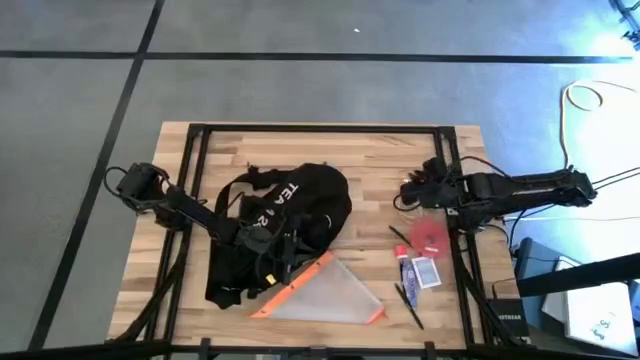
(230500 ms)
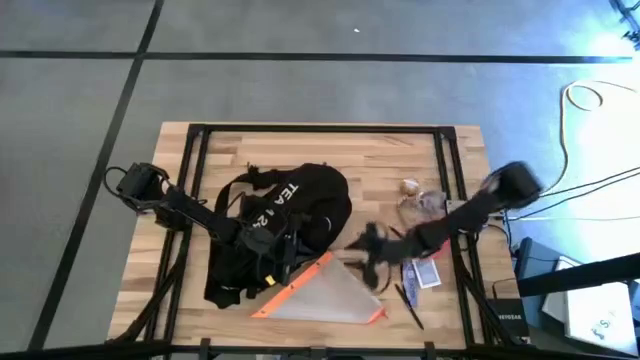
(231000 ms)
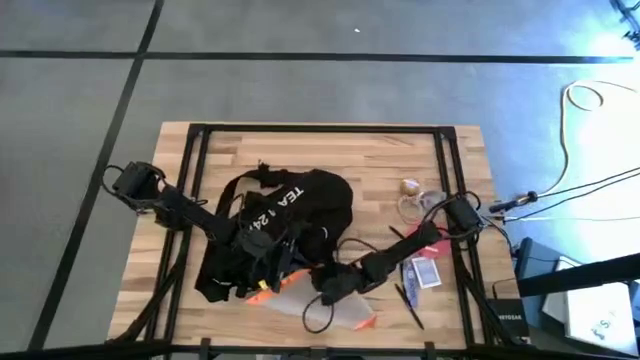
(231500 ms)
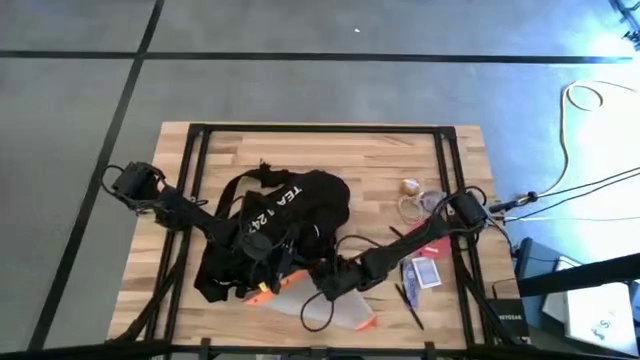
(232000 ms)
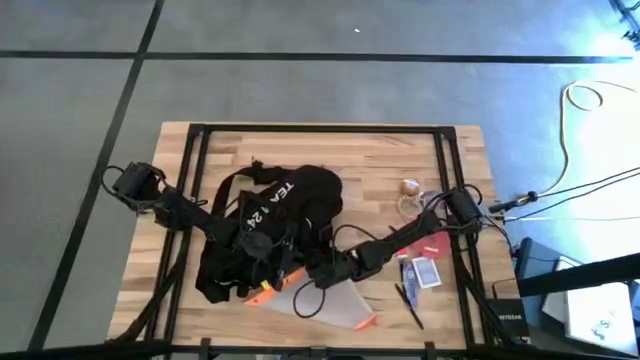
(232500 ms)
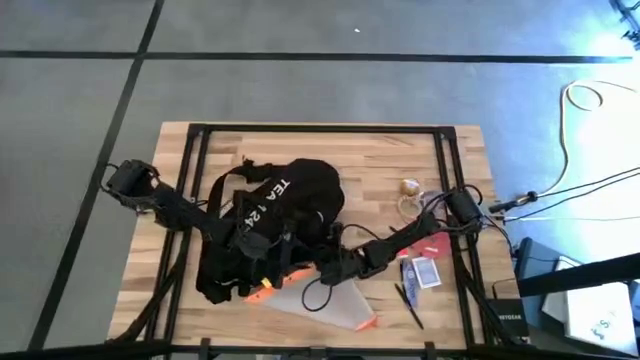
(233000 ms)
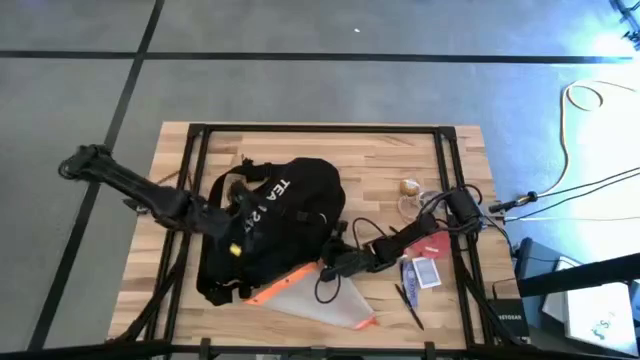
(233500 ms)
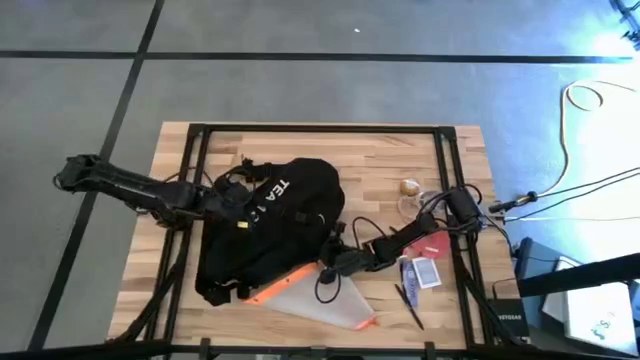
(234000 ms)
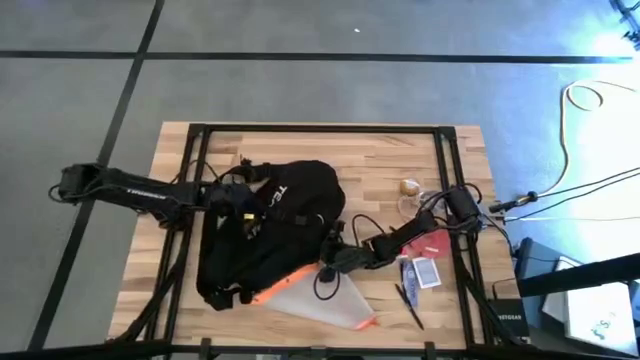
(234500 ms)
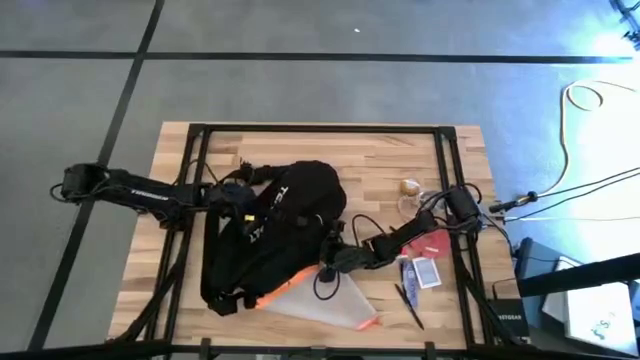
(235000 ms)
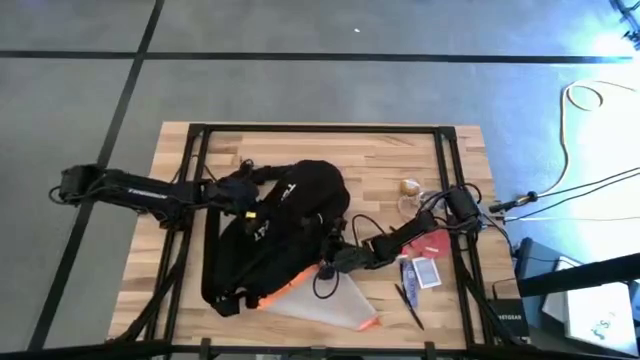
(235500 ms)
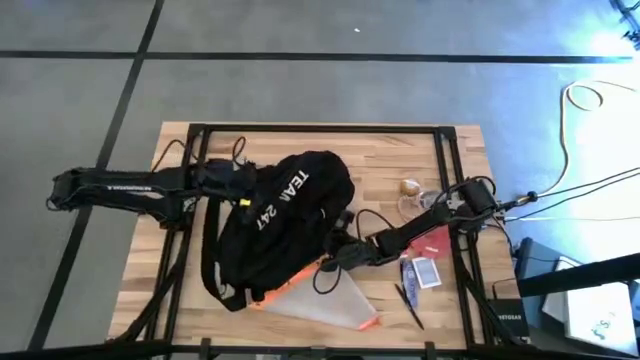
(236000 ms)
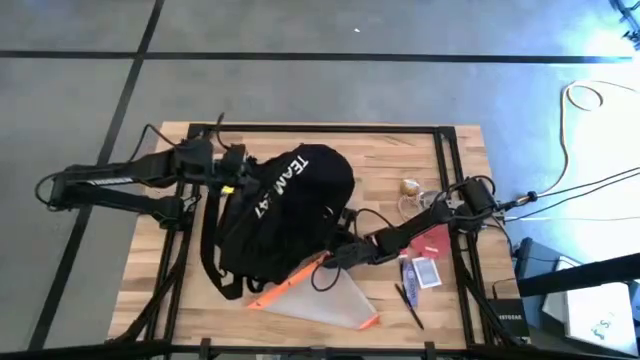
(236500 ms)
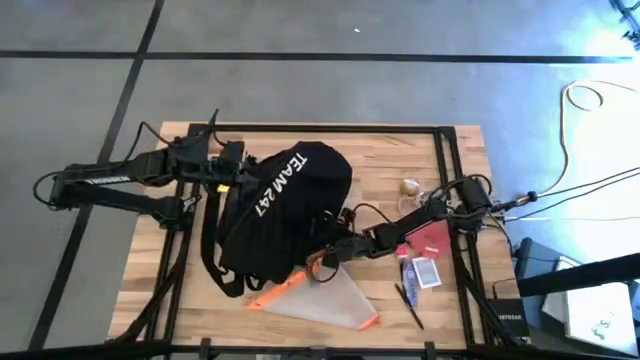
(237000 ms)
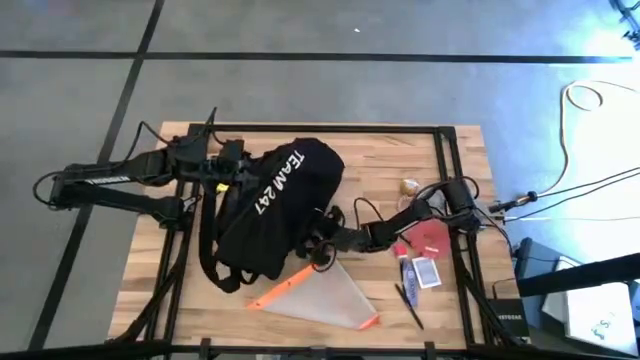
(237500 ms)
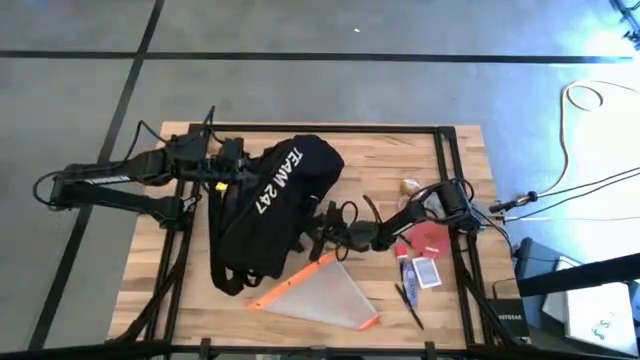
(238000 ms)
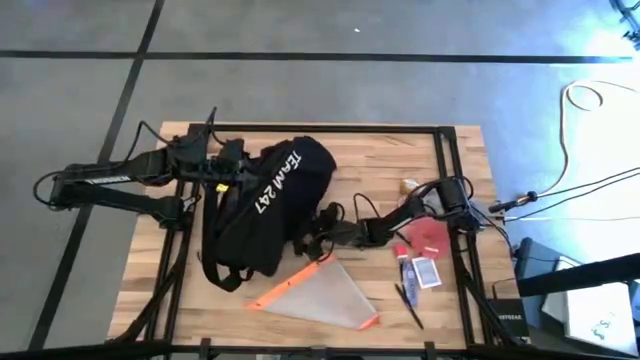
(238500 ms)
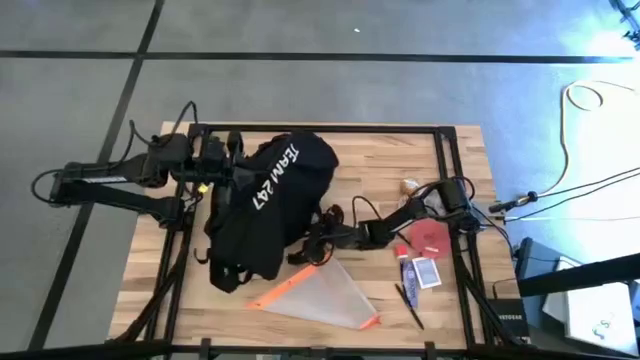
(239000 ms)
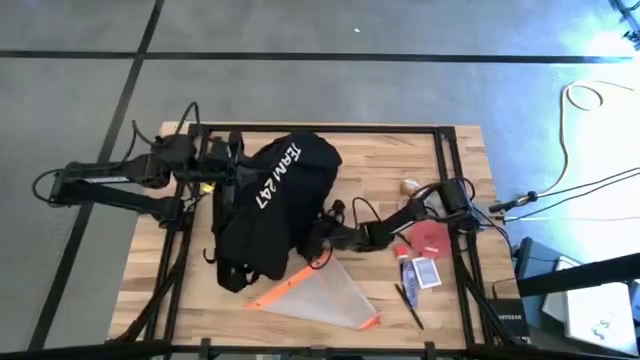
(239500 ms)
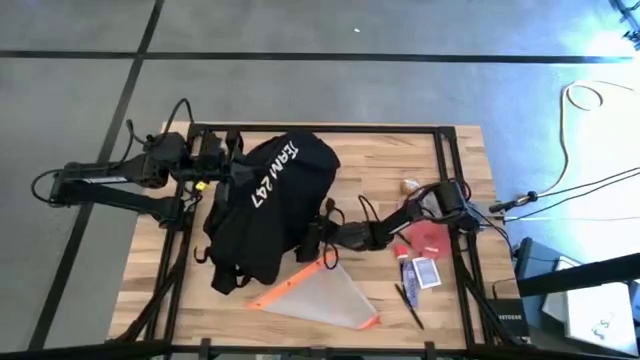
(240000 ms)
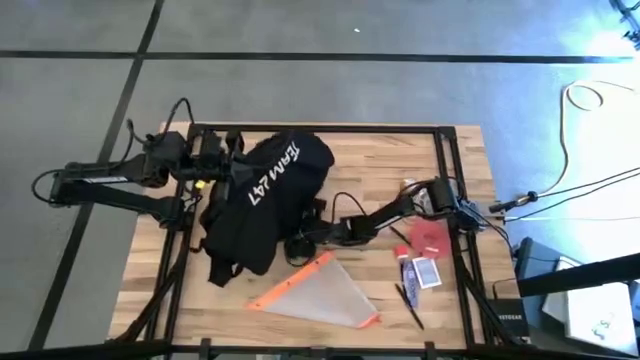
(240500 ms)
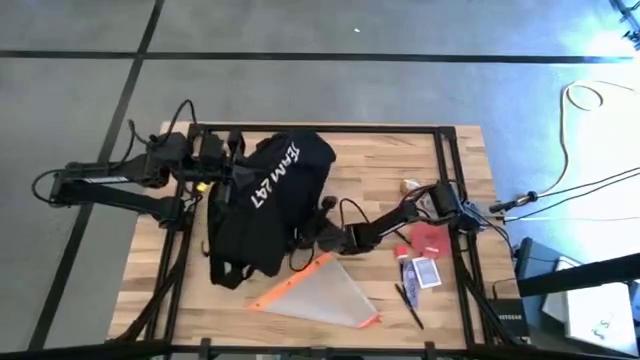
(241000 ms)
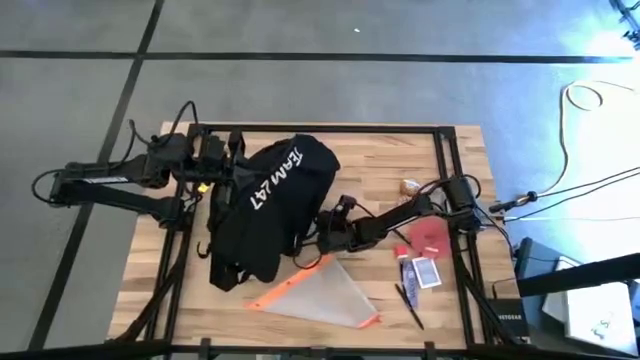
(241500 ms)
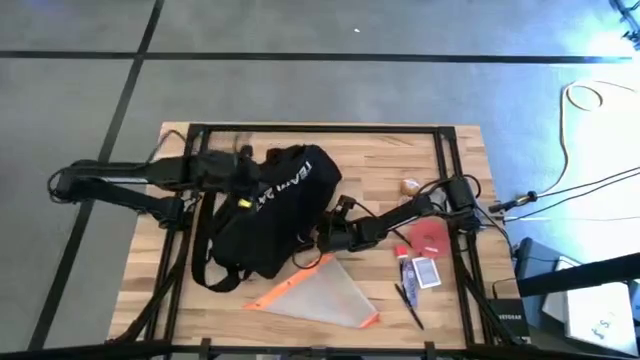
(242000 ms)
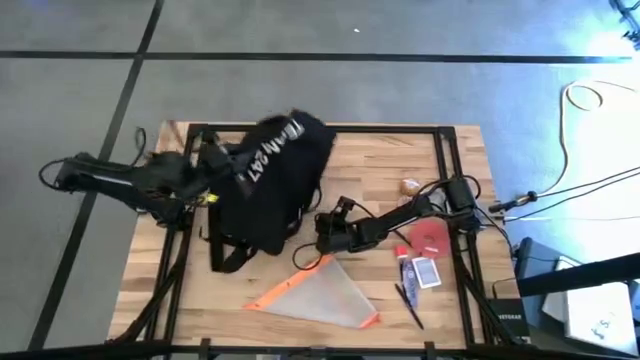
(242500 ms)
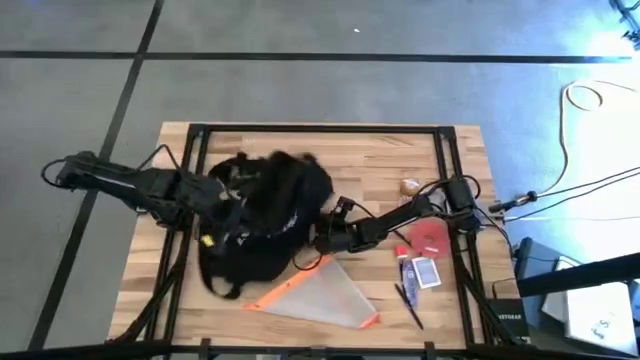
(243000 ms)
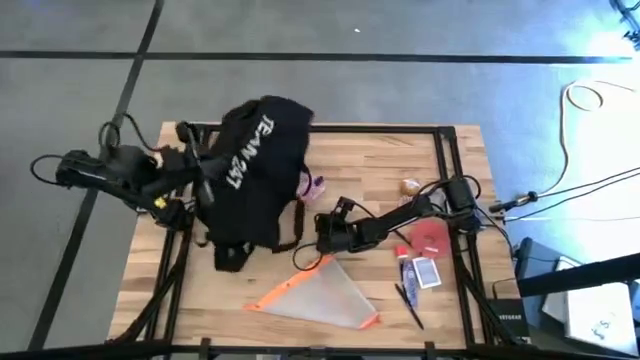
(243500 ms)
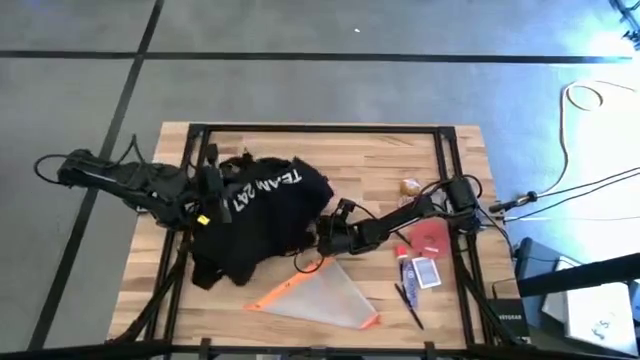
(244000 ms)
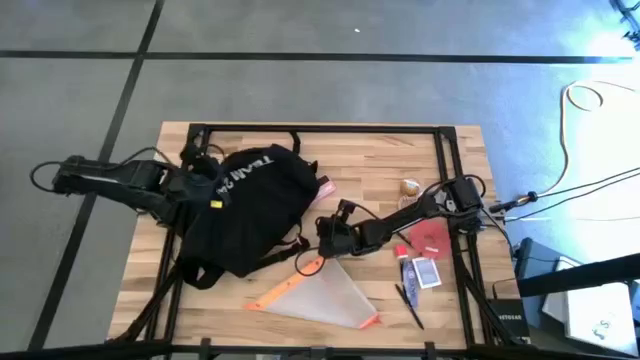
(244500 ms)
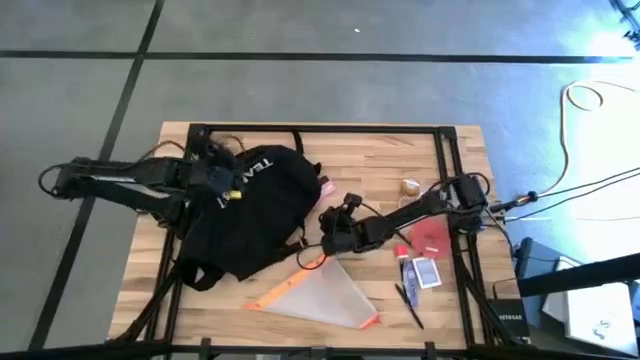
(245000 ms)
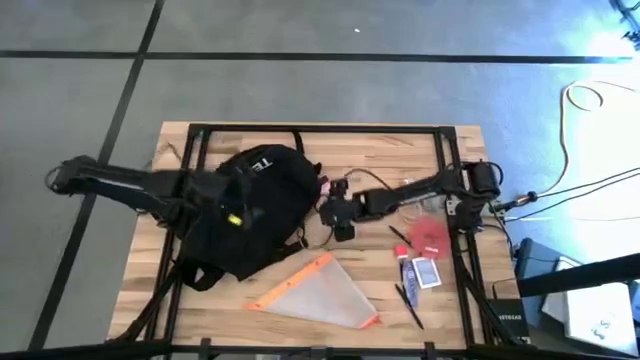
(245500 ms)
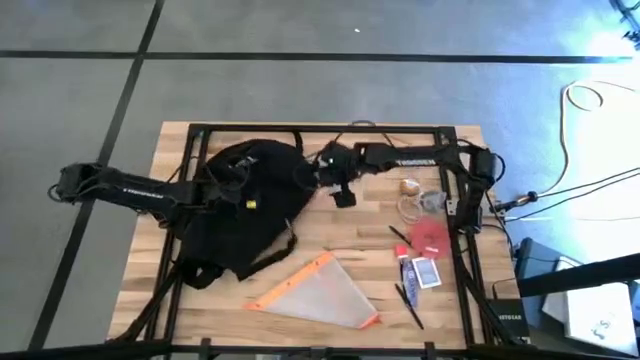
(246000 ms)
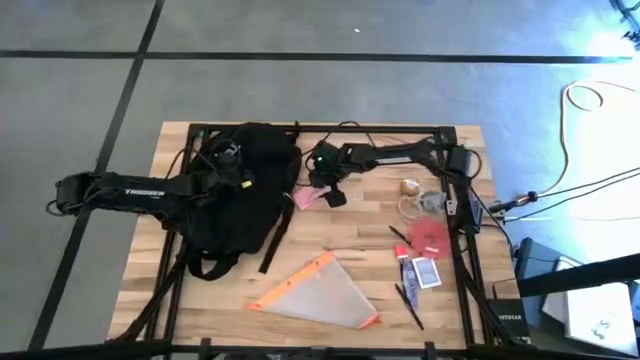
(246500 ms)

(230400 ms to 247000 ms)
Task: Unpack backpack
Remove the pink cellphone from the black bag
